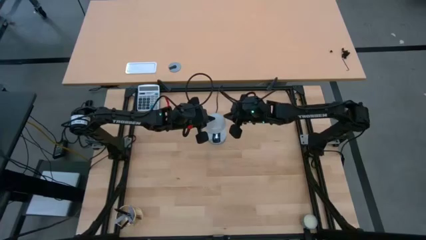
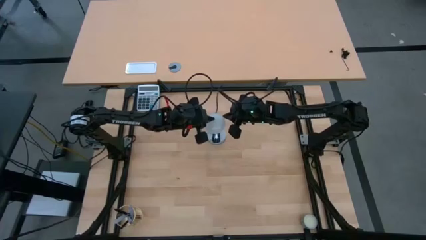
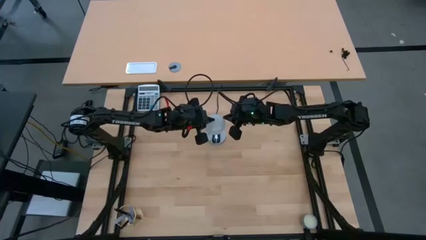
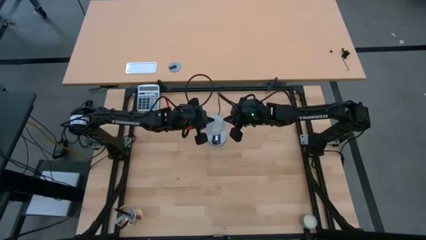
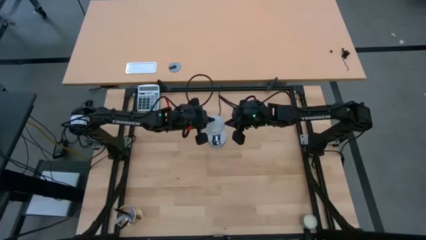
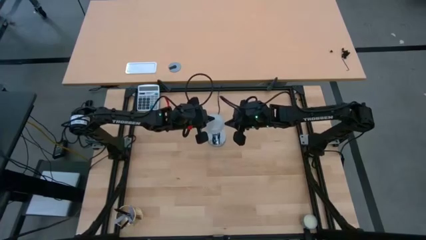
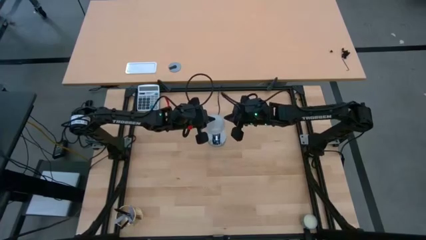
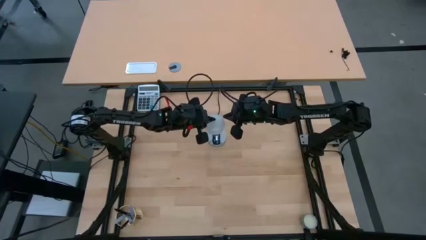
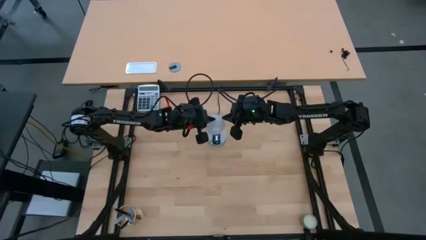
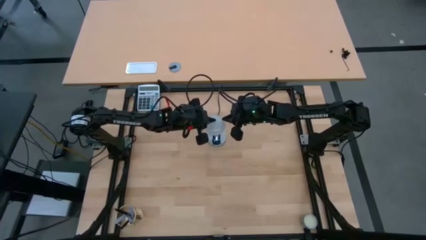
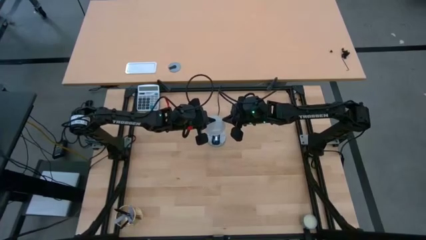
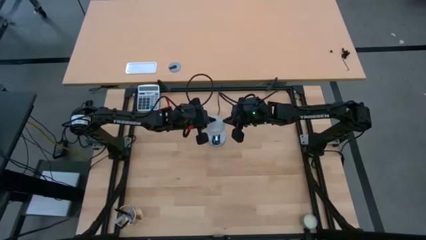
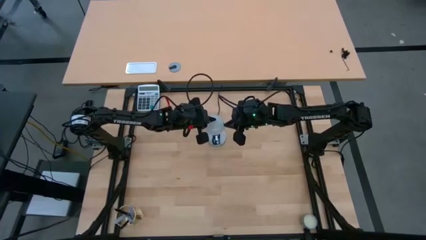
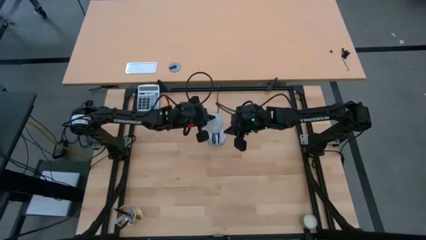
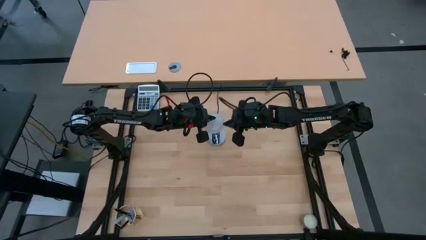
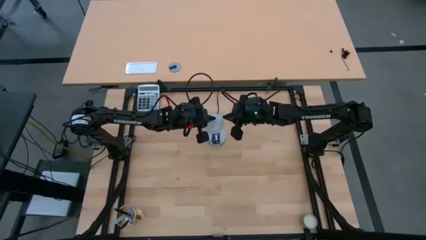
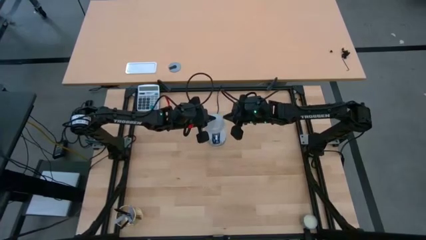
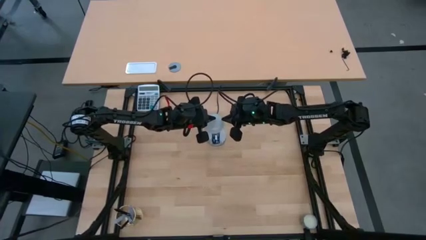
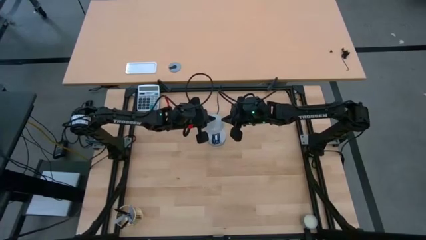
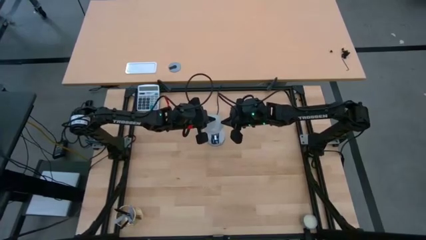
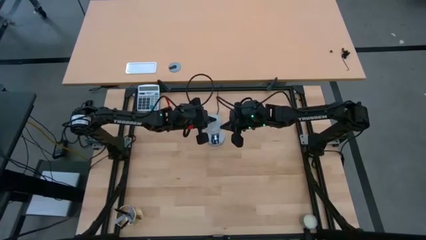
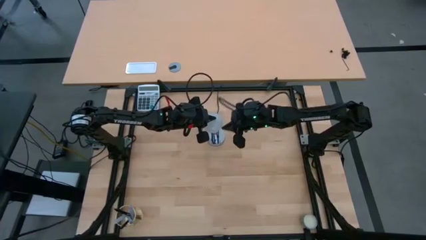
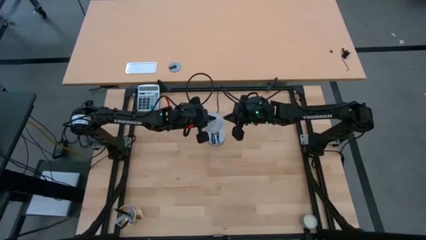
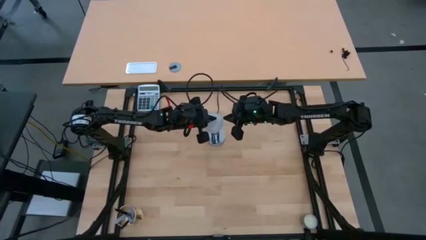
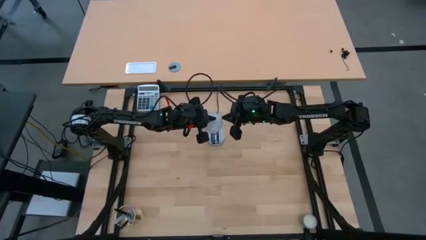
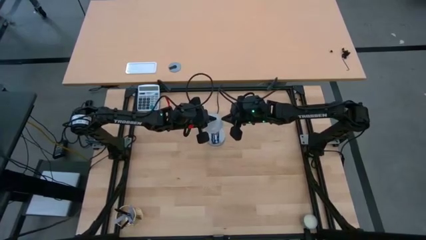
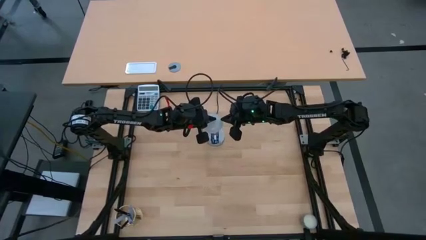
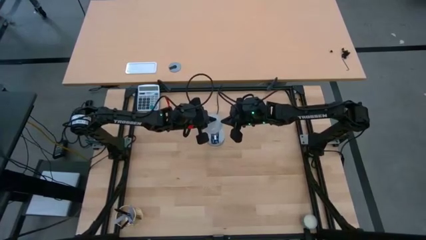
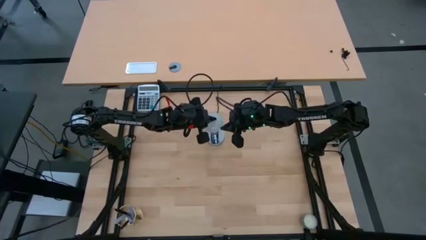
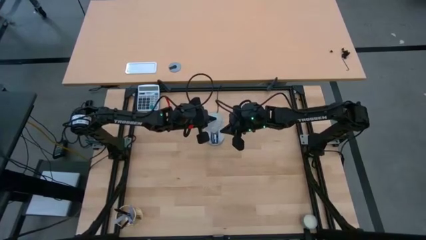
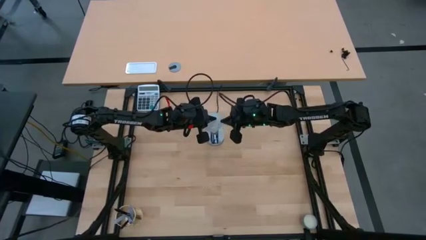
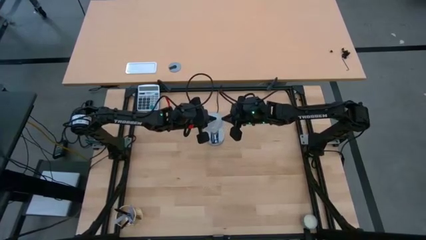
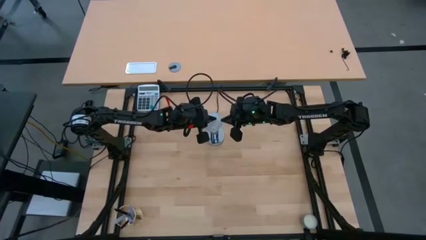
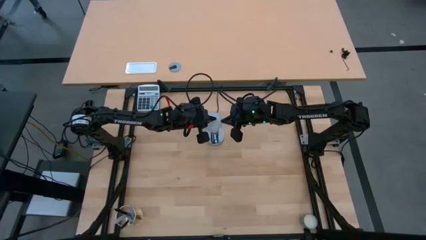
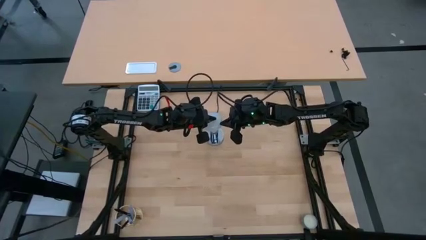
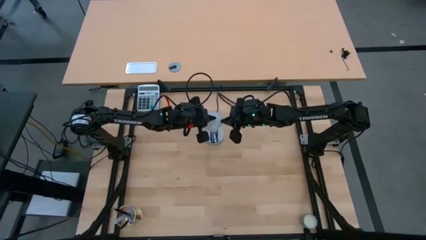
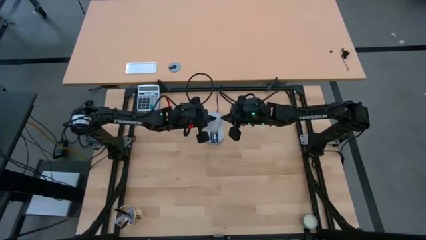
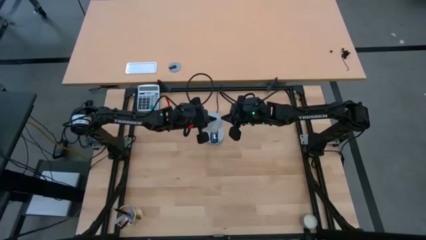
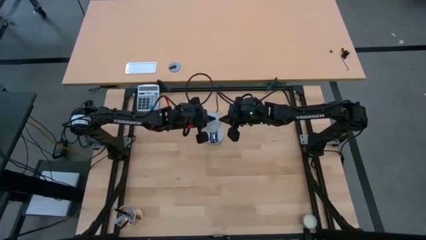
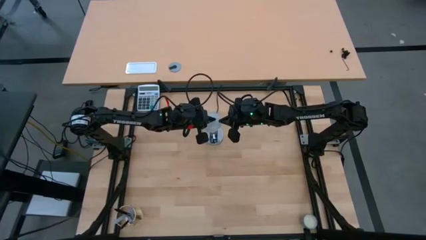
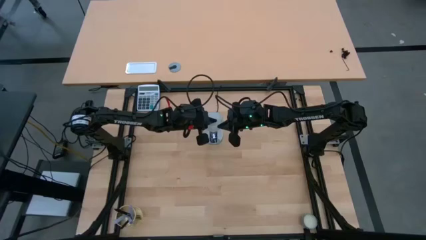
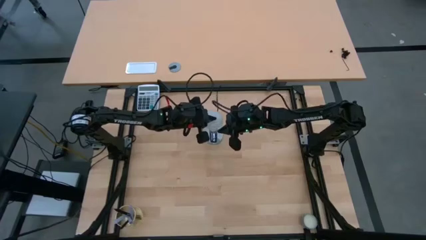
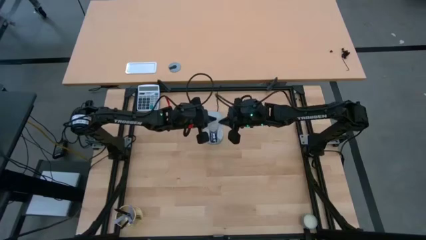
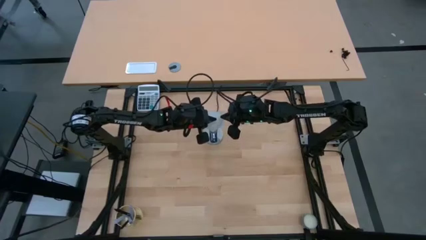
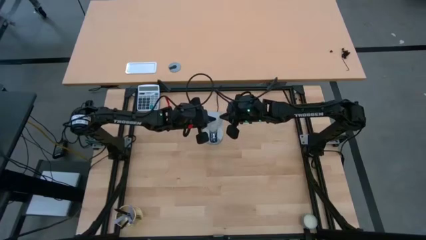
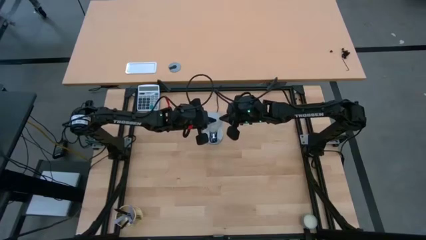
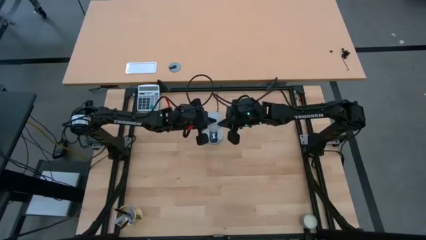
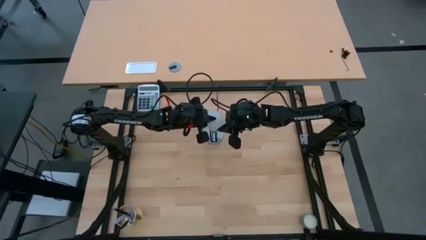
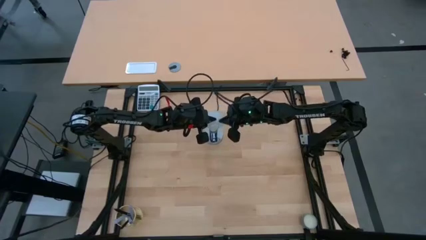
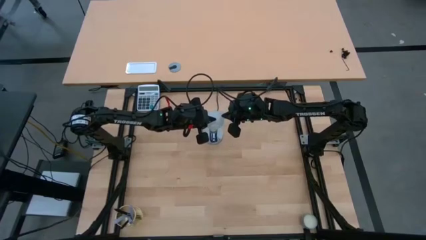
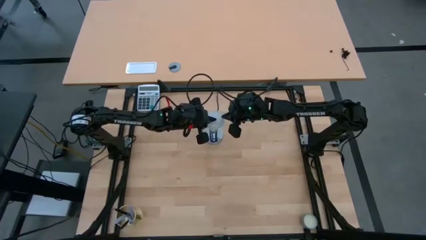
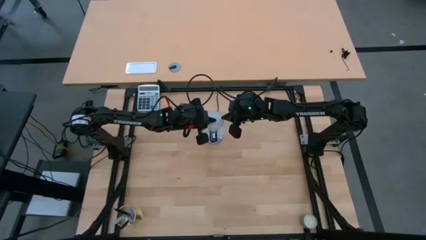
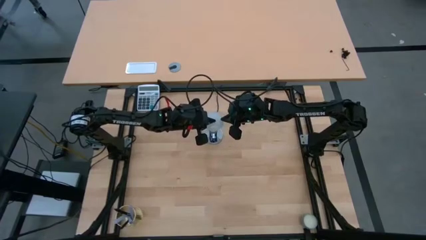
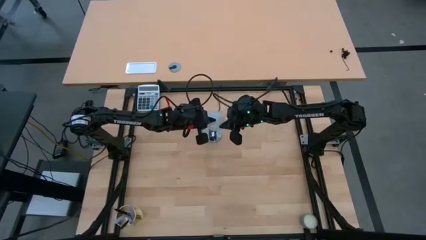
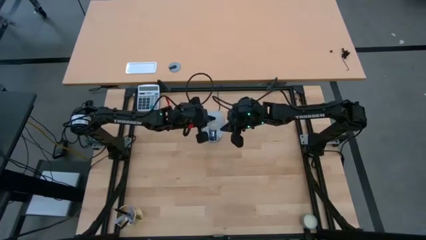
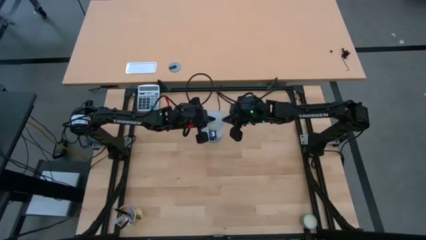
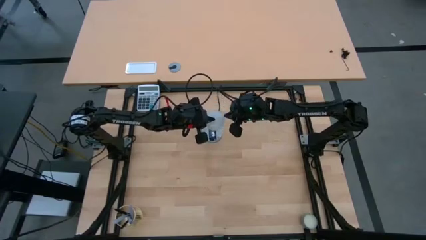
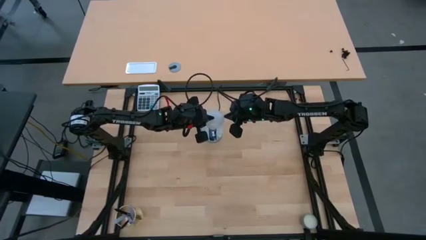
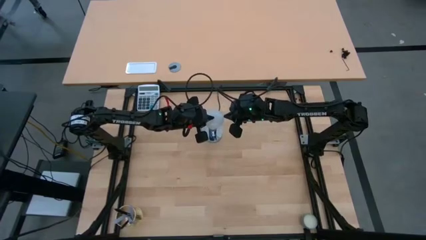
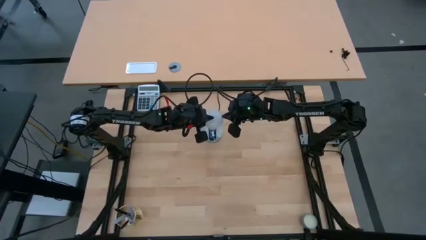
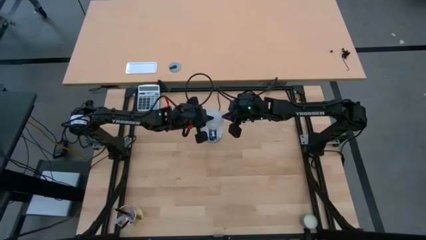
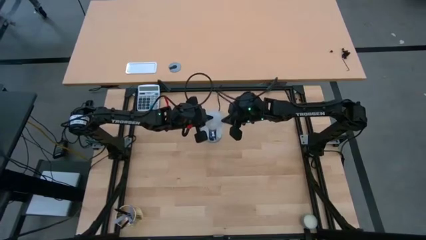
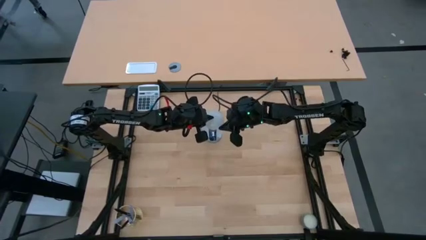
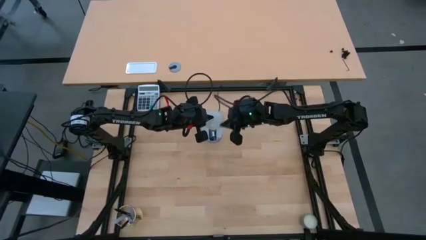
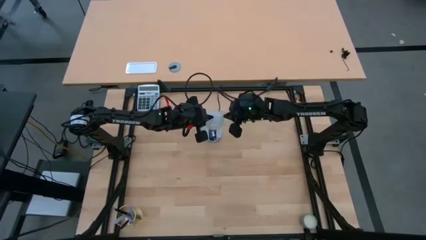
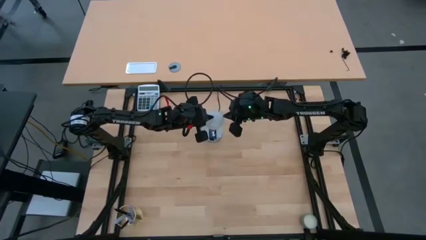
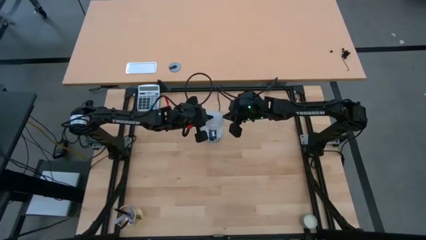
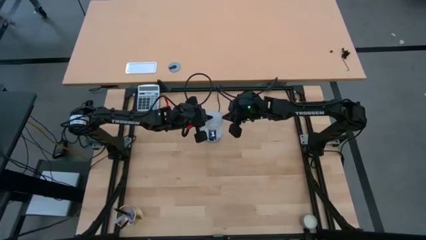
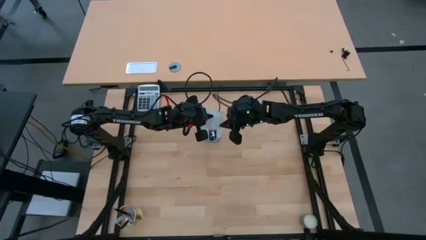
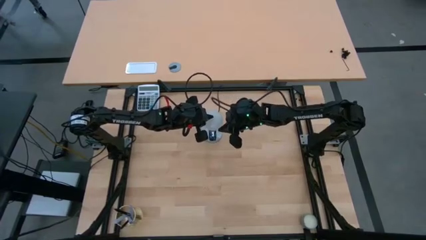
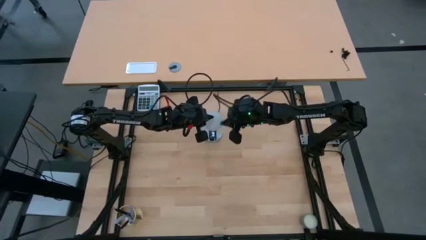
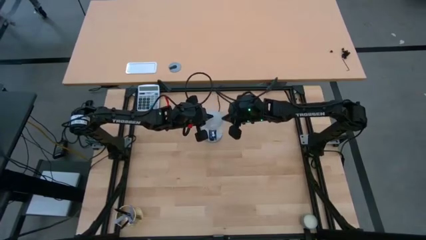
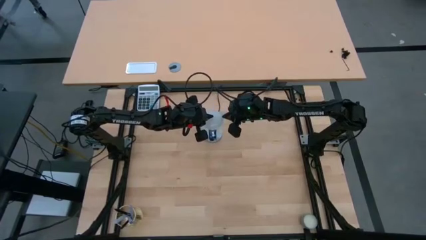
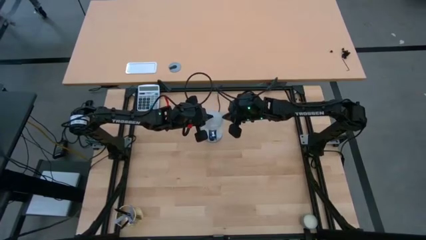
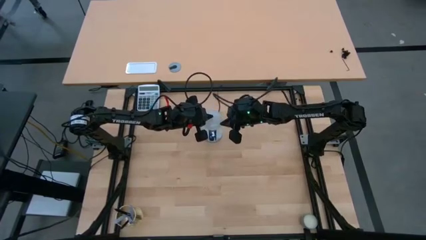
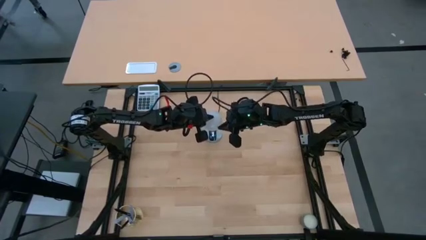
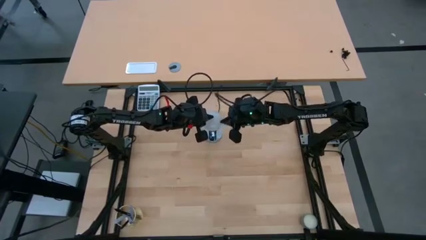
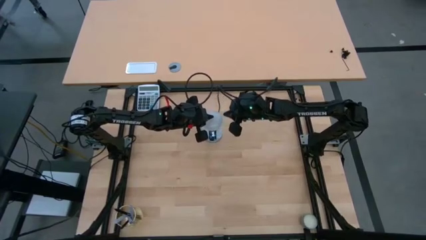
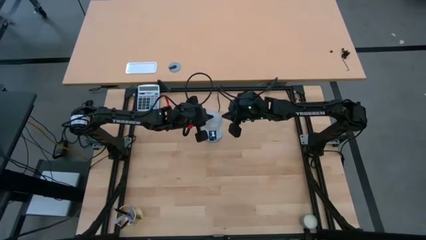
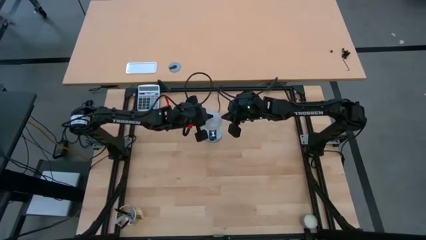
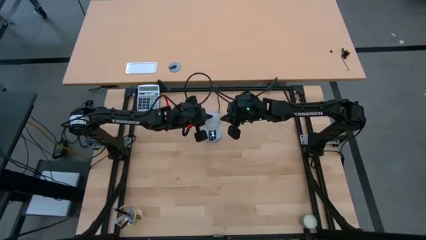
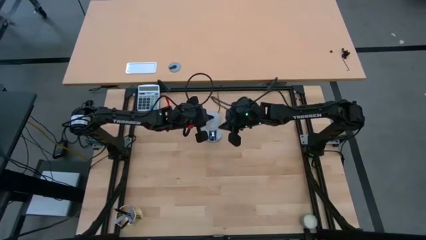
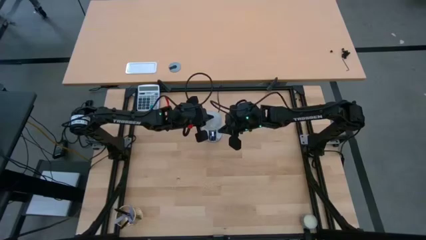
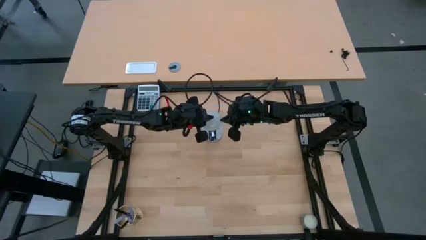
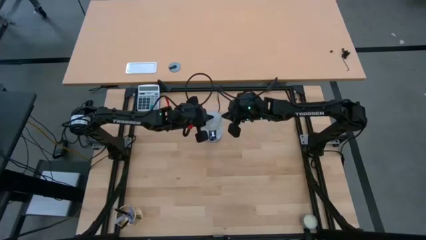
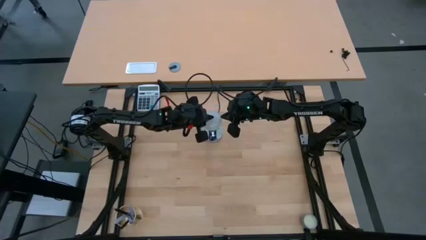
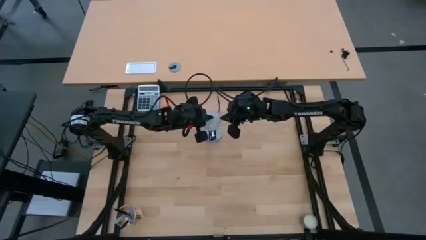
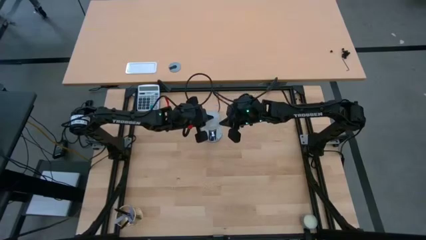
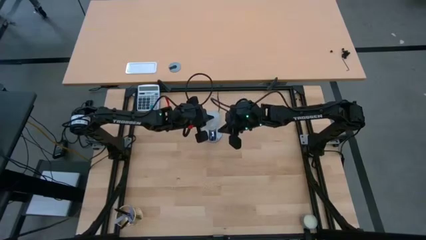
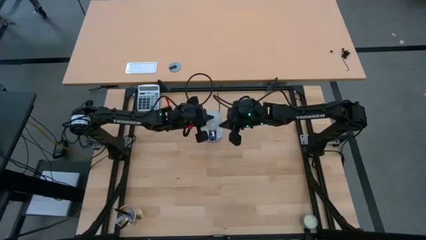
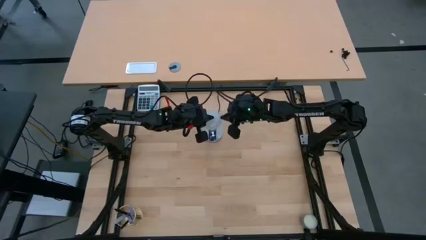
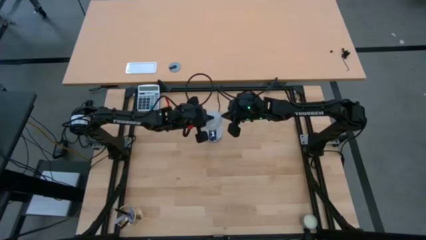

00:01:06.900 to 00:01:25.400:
Task: Screw lightbulb
Insert the lightbulb into the lamp
